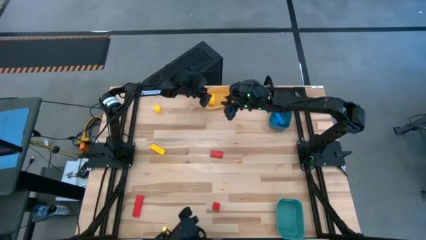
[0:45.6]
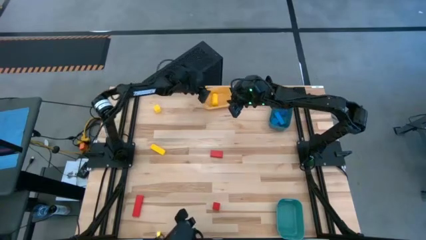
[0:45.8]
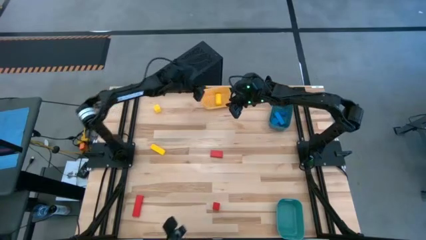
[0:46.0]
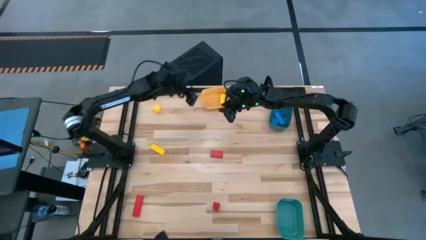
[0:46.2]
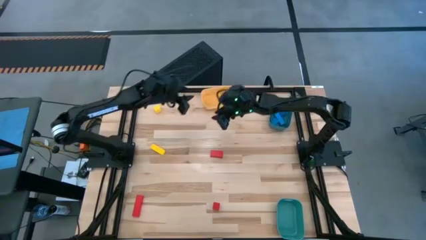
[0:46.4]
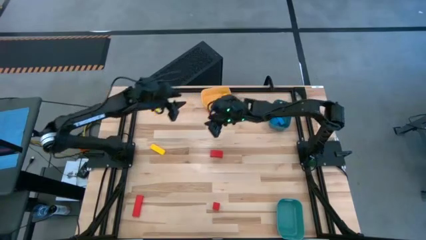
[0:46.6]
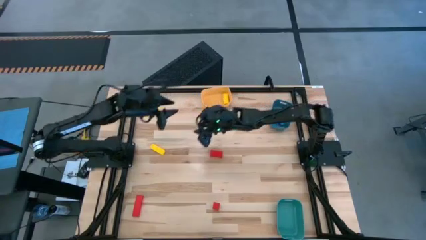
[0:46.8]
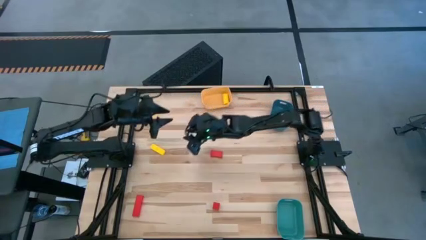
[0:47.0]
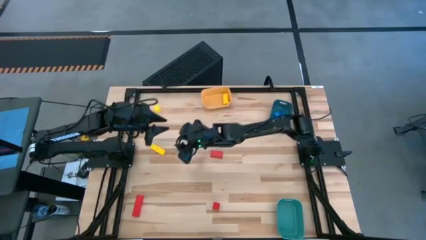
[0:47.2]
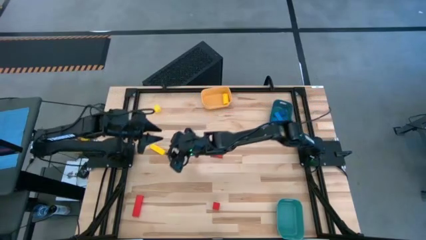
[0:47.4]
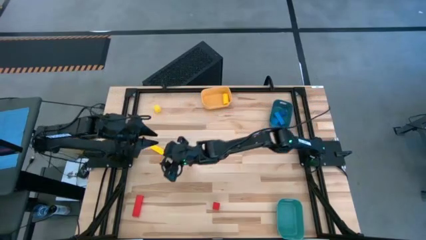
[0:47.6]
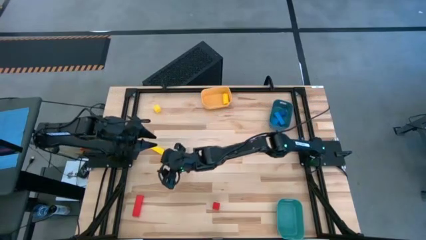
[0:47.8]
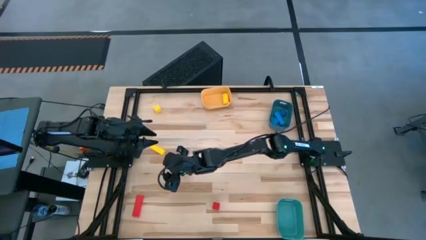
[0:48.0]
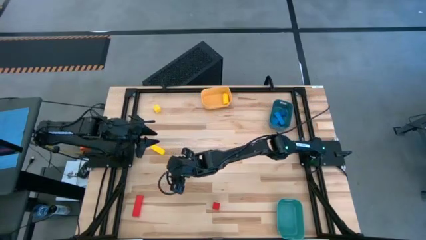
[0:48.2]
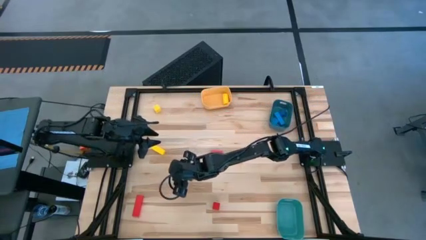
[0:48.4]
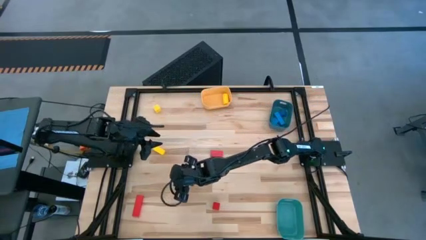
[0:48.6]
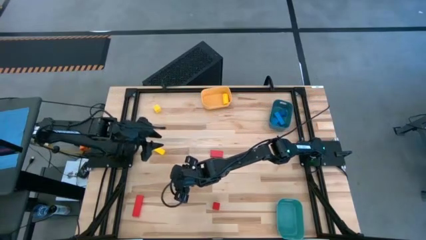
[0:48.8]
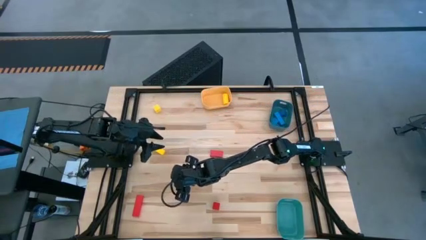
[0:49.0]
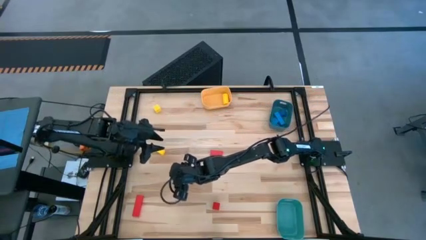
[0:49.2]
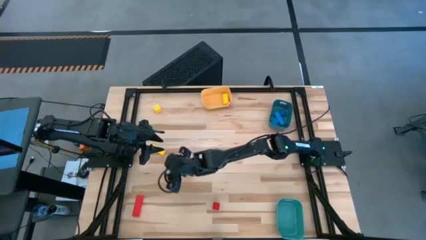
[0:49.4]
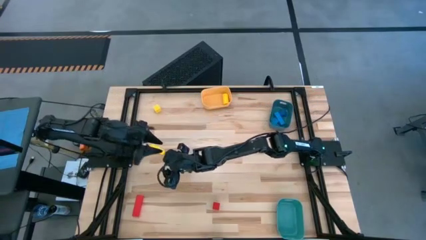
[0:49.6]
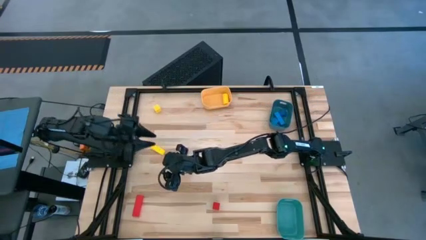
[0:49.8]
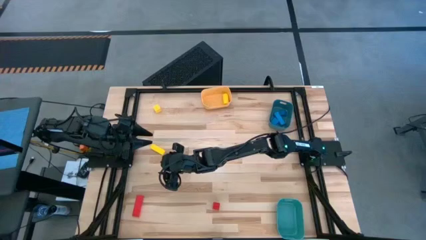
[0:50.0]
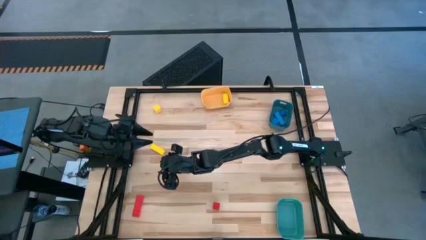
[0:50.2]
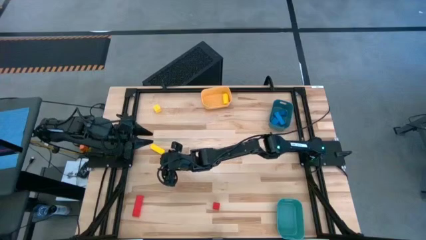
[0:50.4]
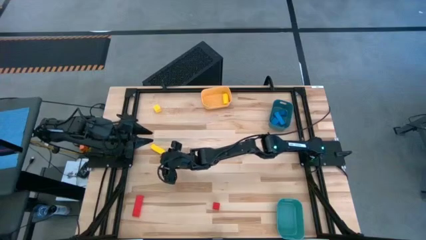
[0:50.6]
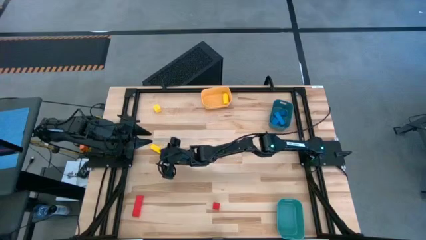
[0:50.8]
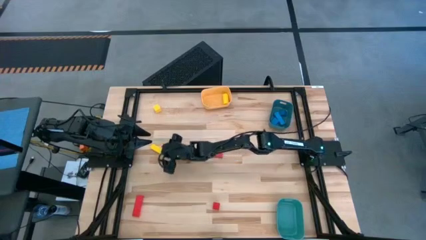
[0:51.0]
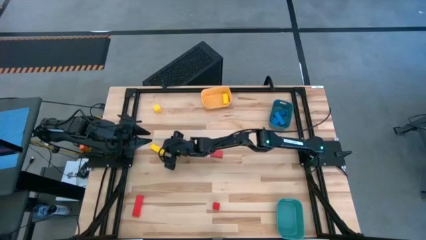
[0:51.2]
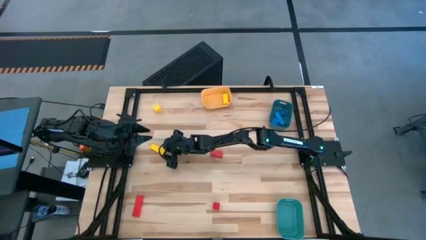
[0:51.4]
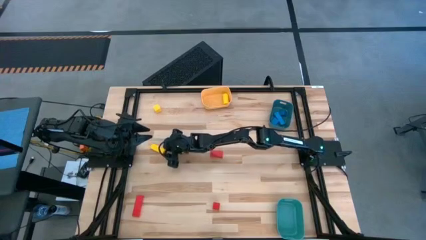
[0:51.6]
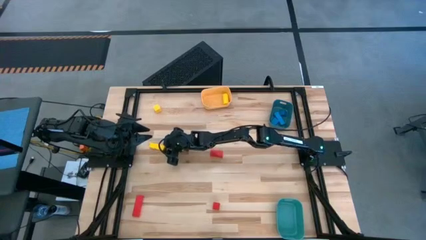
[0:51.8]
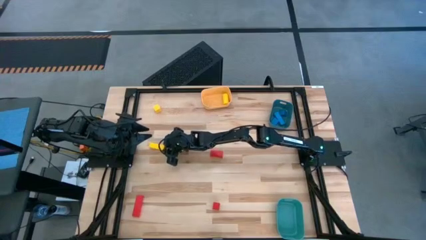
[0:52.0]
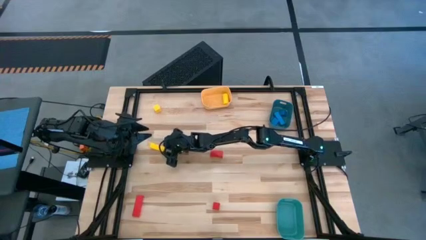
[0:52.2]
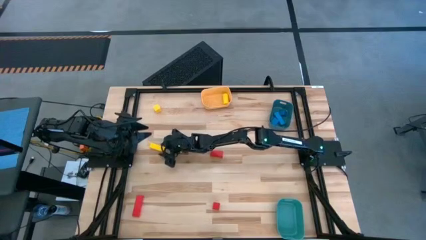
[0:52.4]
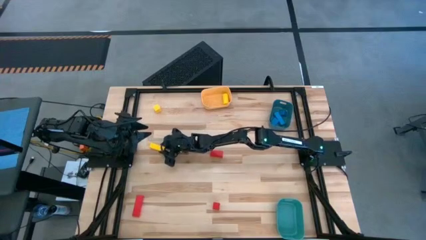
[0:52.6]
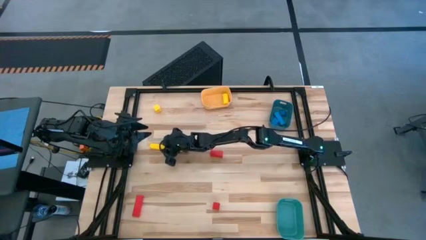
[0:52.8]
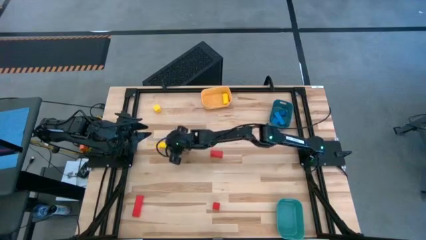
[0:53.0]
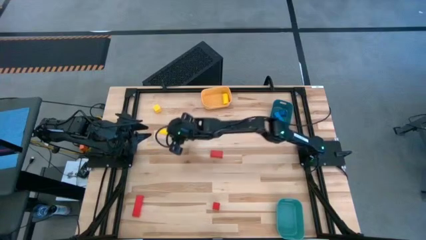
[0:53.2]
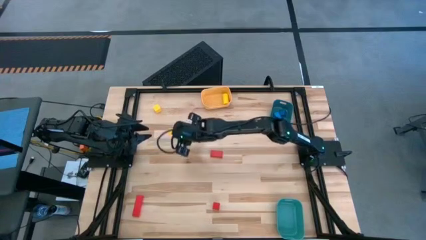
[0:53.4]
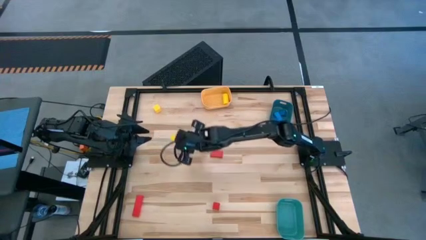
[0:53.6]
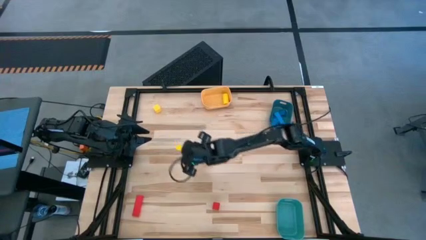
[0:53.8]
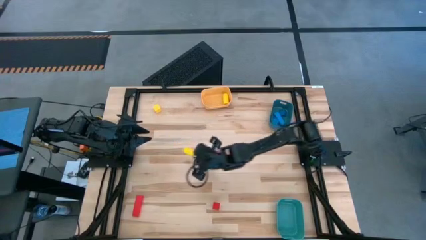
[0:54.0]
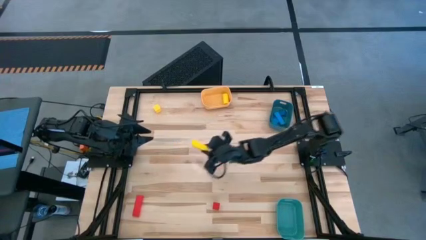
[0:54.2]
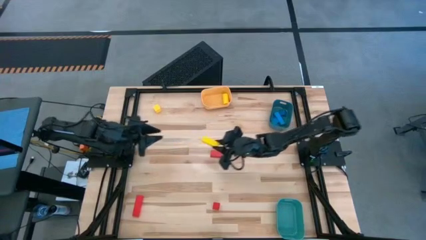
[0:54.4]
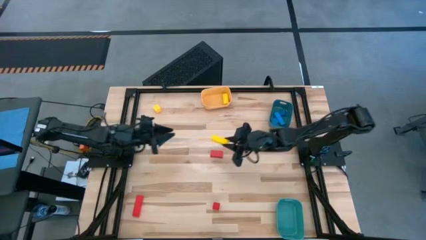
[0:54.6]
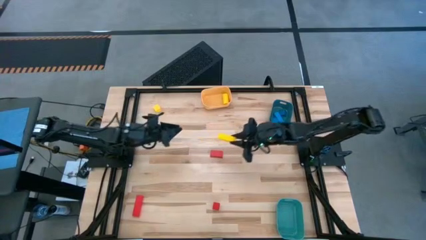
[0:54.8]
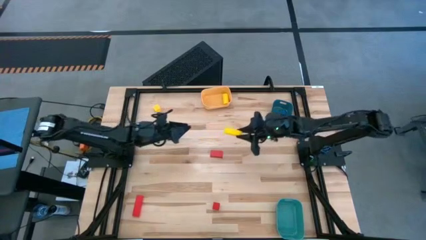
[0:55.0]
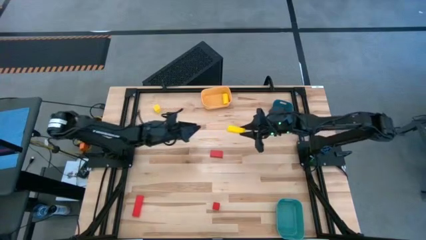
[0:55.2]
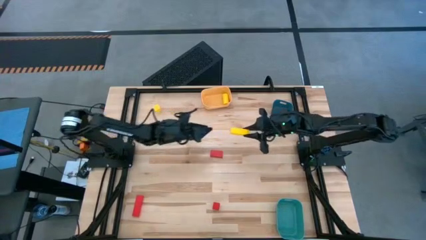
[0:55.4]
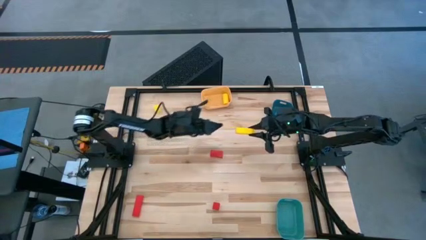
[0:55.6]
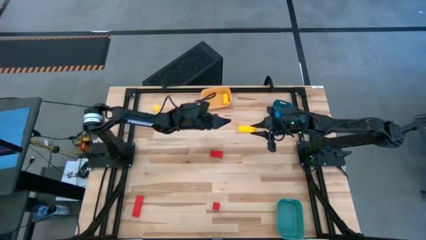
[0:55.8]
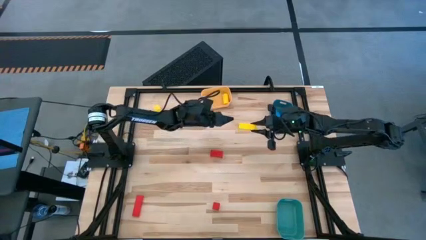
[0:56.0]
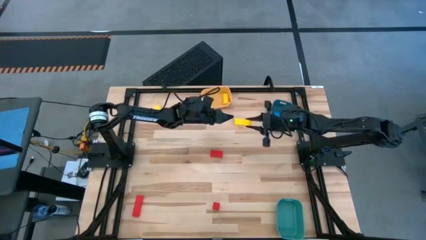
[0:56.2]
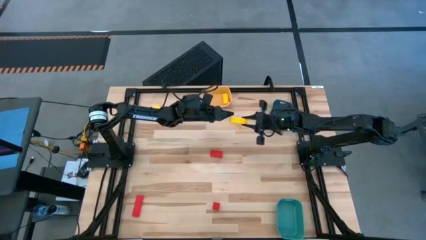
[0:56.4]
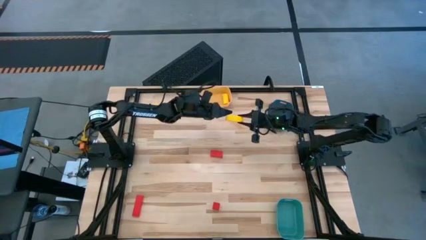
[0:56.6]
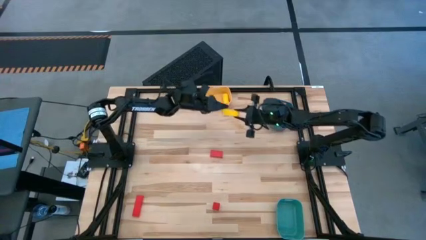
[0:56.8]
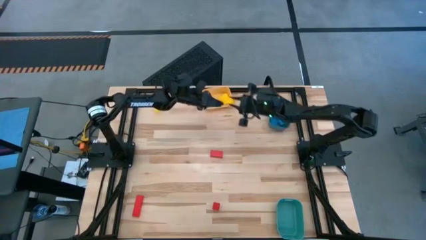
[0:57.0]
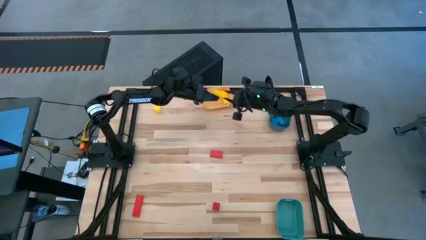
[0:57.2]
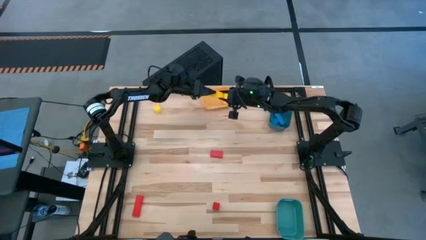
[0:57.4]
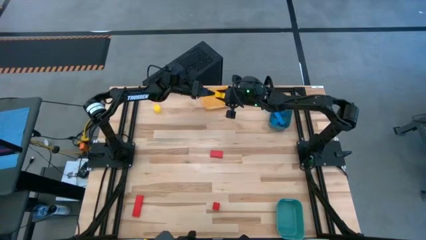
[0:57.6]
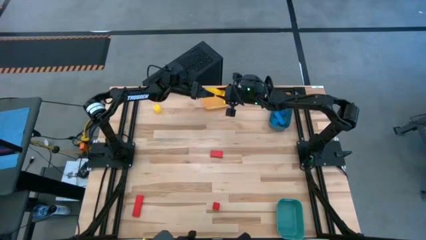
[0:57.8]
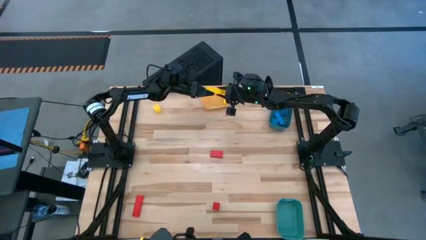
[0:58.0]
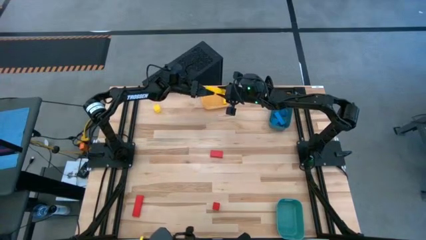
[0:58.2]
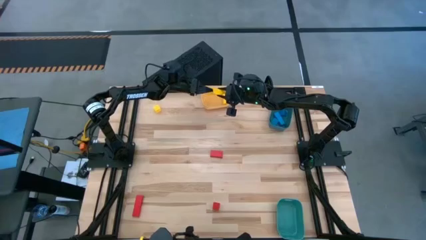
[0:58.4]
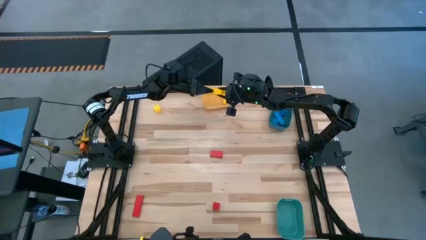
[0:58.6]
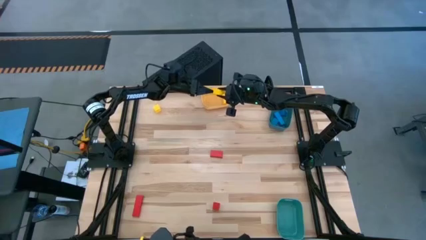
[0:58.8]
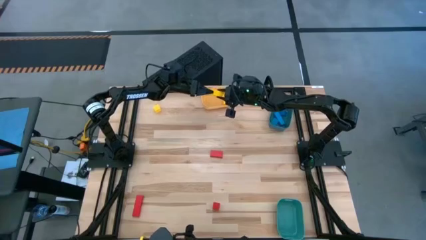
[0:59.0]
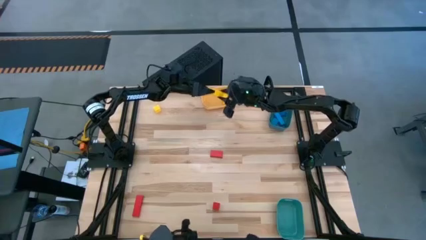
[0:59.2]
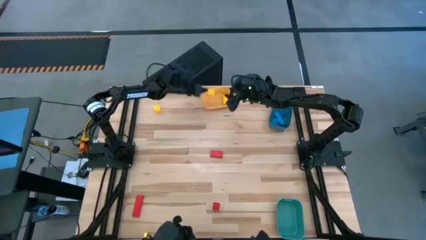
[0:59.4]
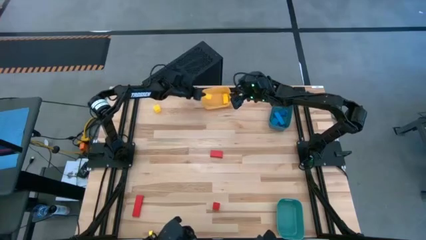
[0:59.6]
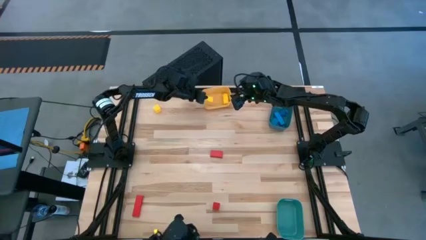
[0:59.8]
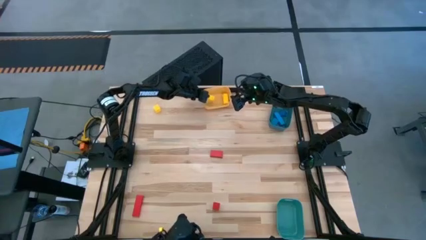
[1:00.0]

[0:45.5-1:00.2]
Task: Sort & place blocks by color
Put the bottom yellow block into the yellow bin
